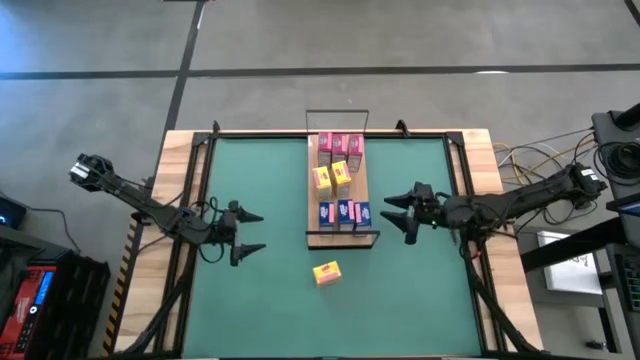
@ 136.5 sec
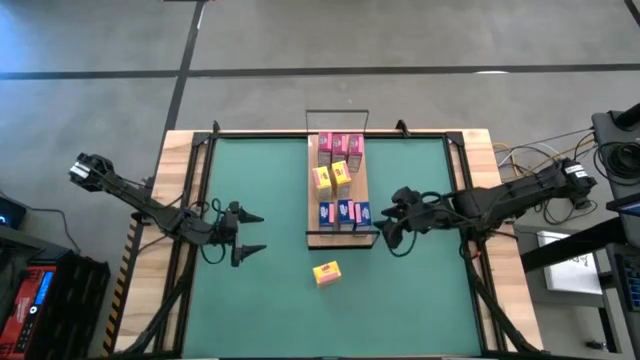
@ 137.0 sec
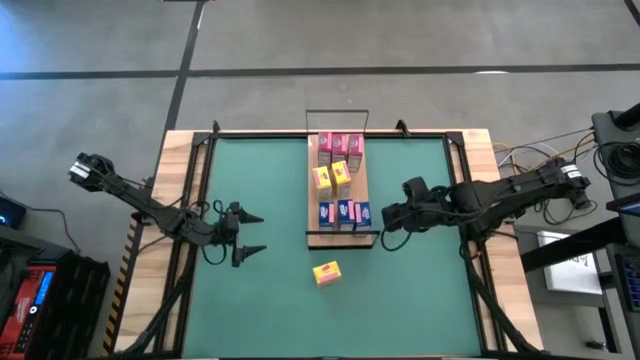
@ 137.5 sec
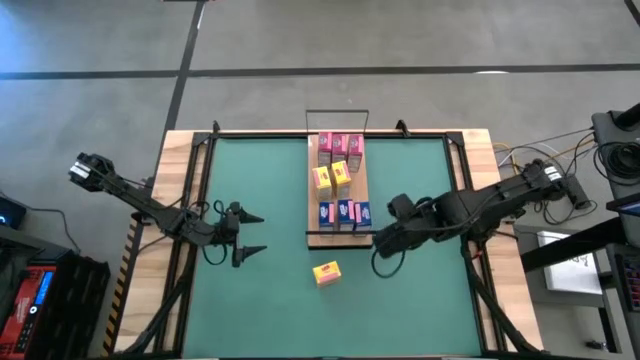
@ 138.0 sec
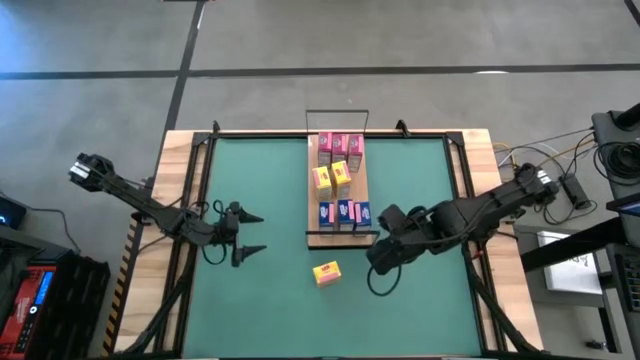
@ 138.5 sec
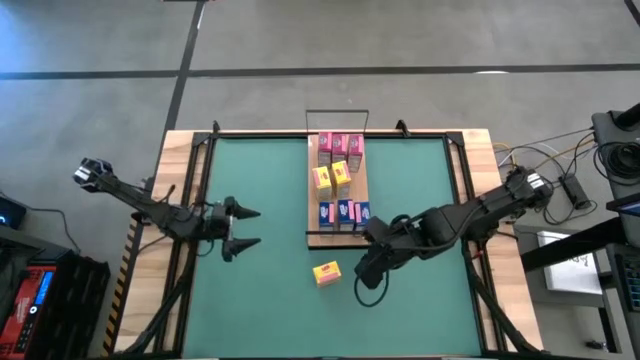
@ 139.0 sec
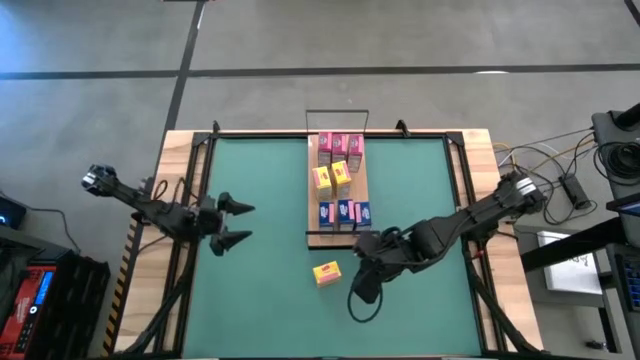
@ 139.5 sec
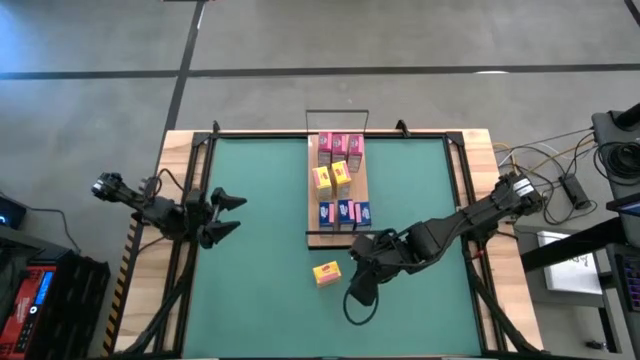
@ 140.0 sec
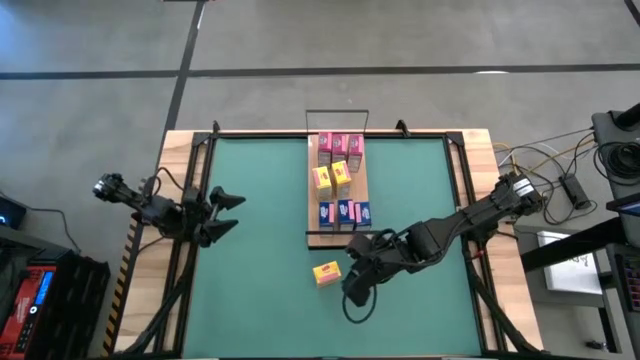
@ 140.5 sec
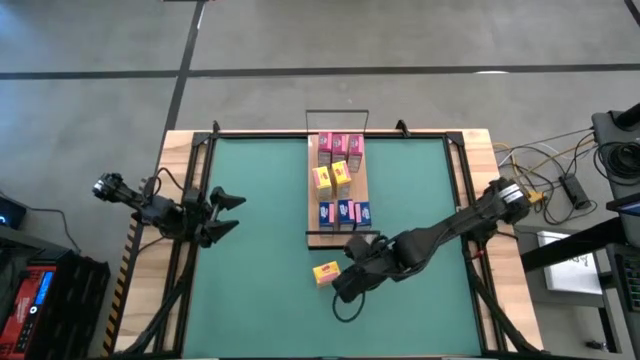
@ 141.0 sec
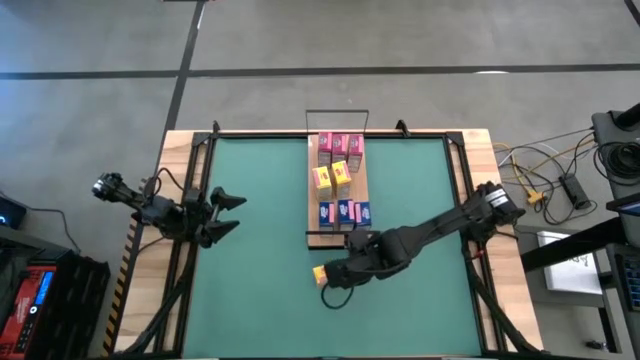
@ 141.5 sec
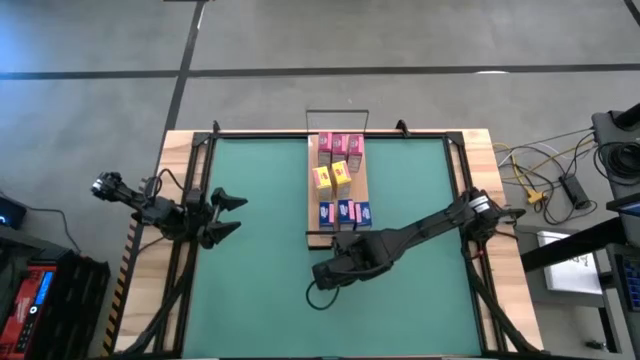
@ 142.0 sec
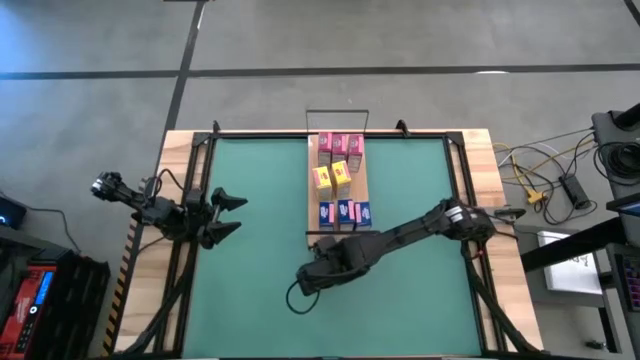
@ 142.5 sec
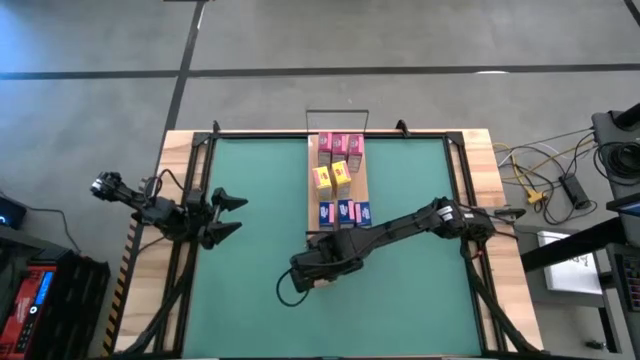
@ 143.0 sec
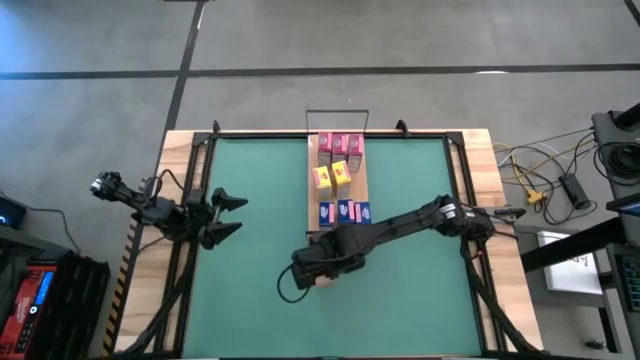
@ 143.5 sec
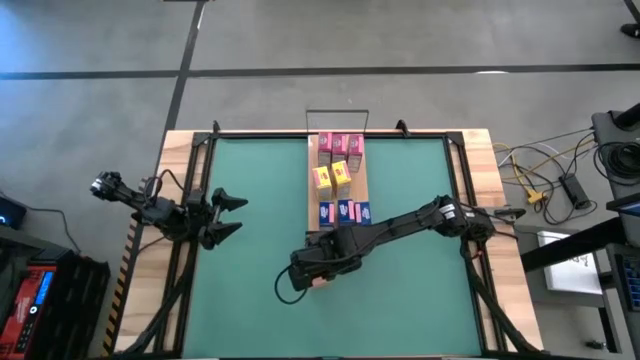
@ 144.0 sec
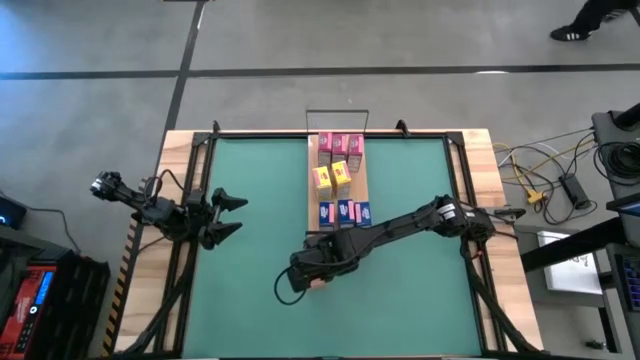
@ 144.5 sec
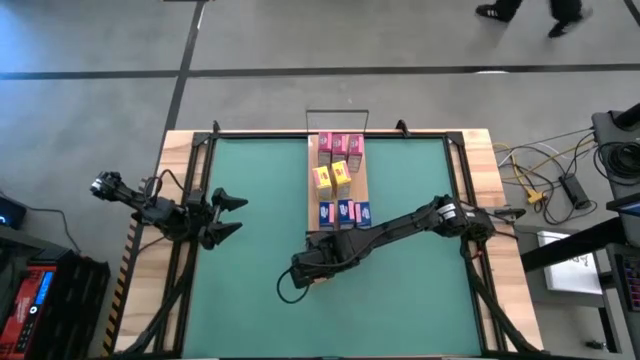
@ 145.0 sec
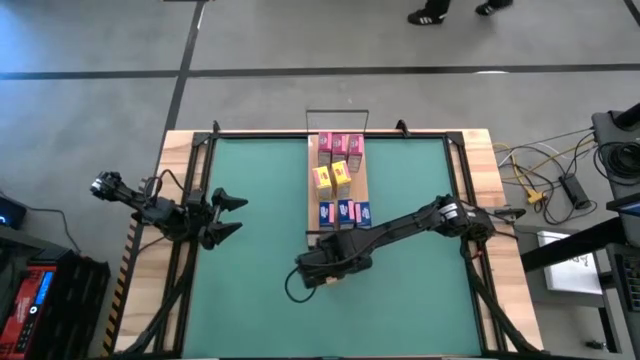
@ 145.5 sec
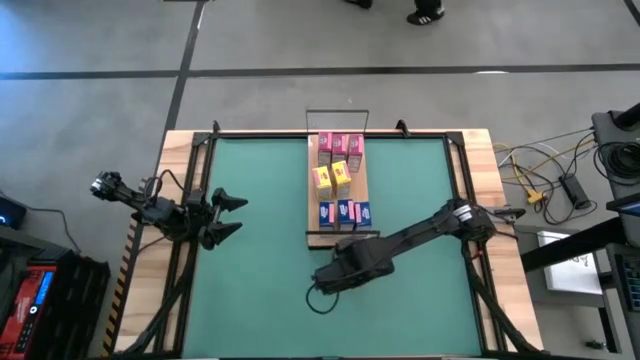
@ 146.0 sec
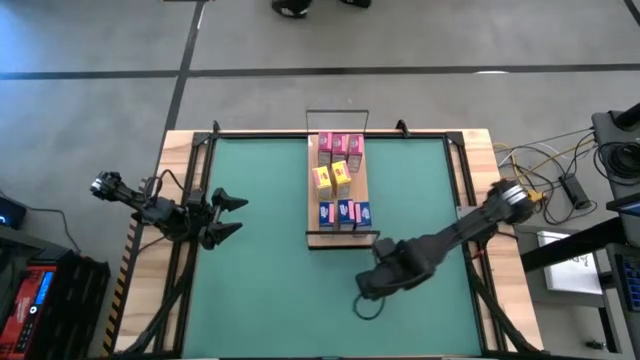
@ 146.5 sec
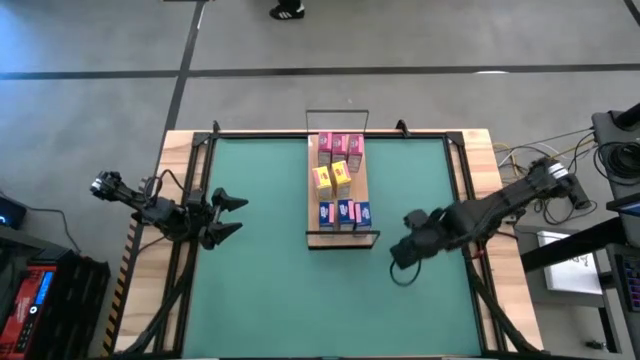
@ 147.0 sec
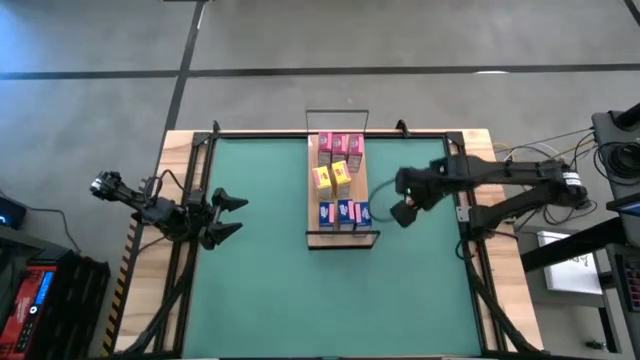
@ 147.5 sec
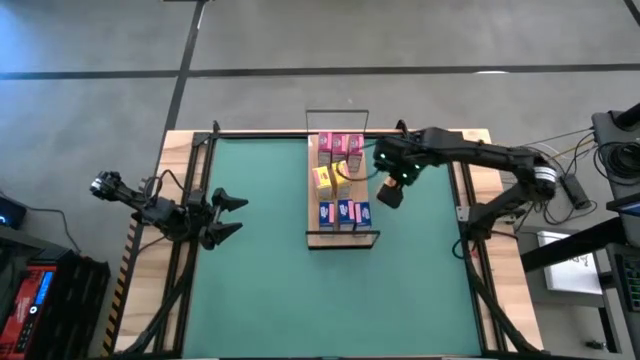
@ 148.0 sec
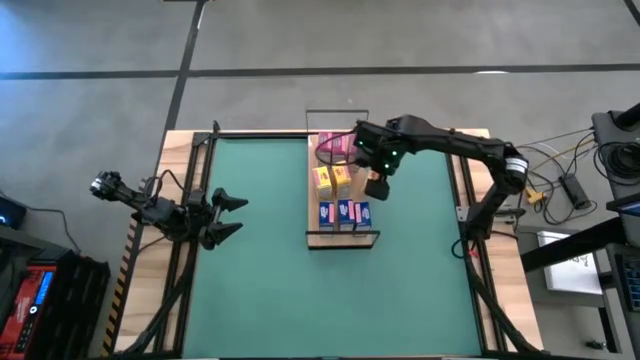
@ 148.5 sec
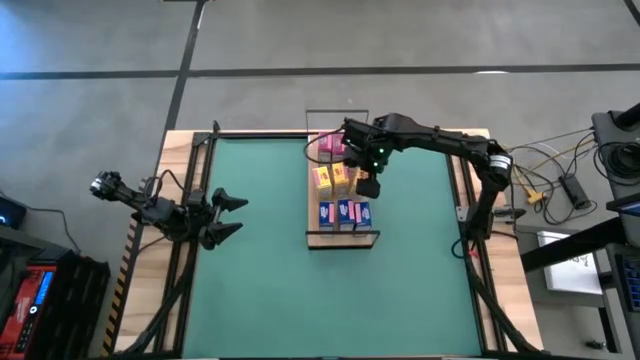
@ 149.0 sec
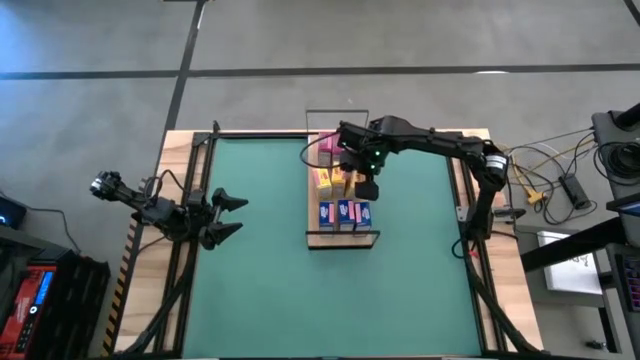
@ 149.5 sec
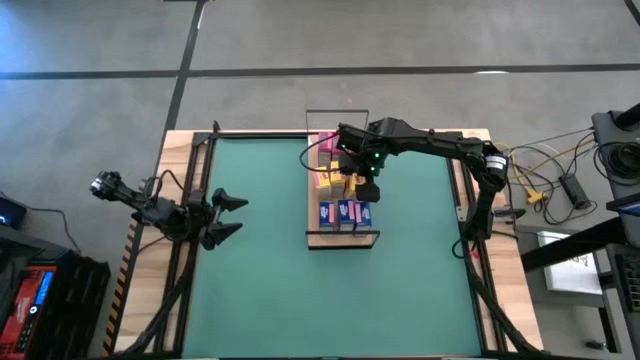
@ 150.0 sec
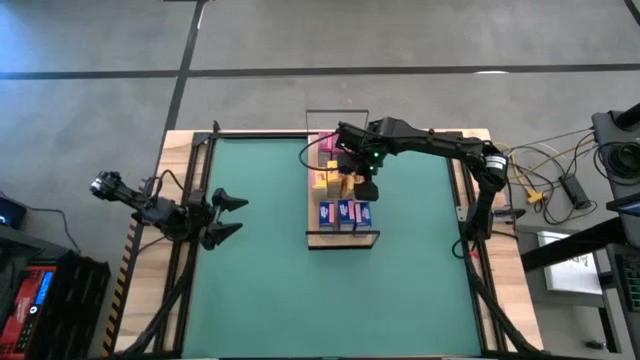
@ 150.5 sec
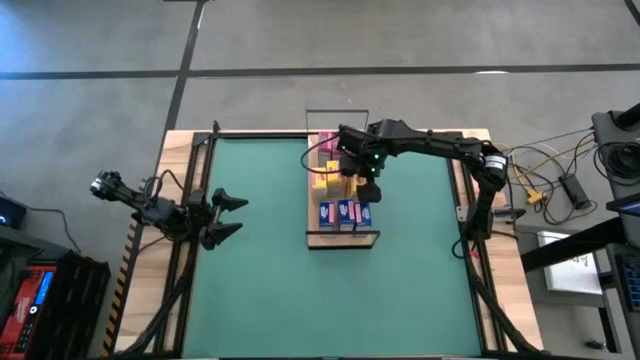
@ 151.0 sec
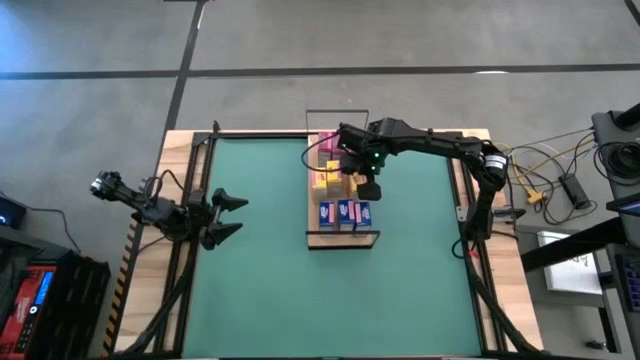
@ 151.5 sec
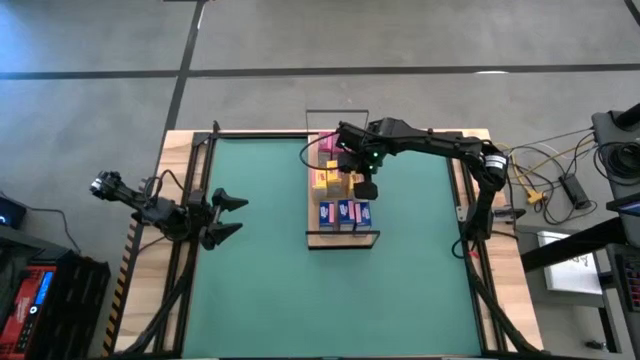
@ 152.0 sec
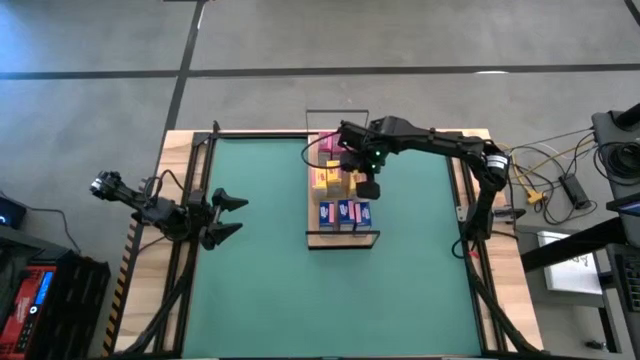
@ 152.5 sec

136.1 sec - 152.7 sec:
Task: Stack cereal on shelf
Put the yellow cereal box on the shelf

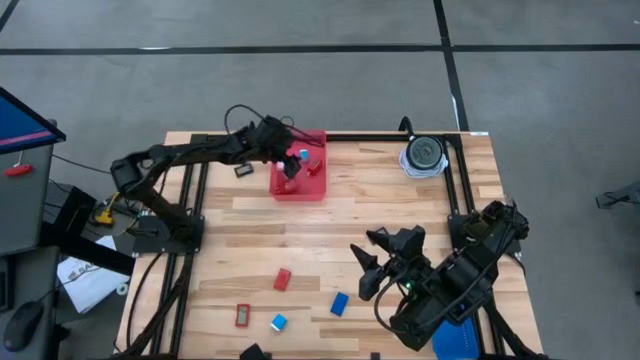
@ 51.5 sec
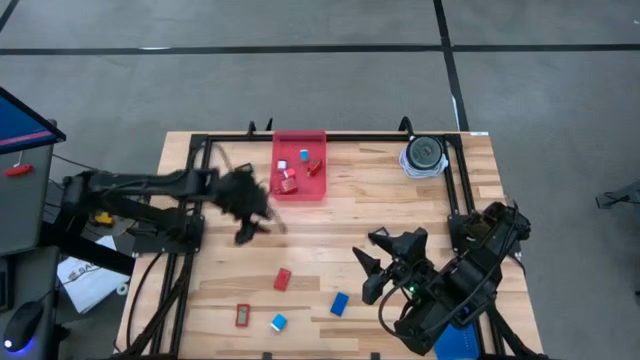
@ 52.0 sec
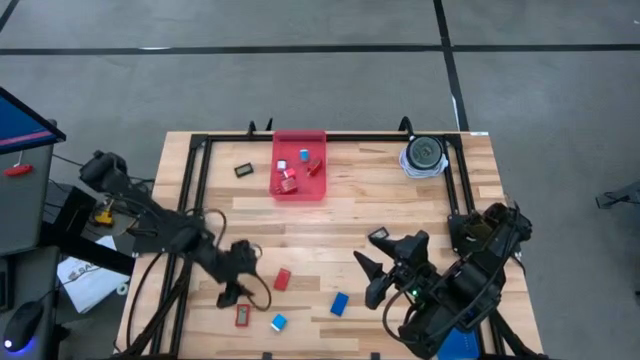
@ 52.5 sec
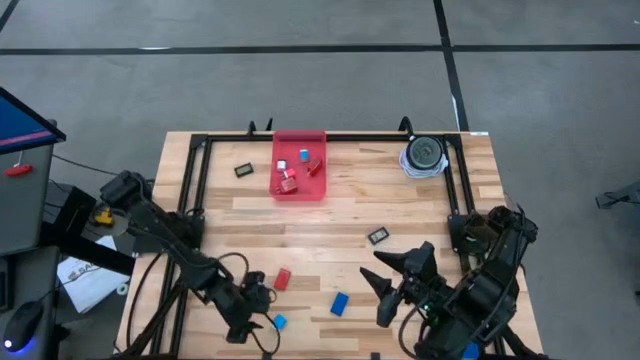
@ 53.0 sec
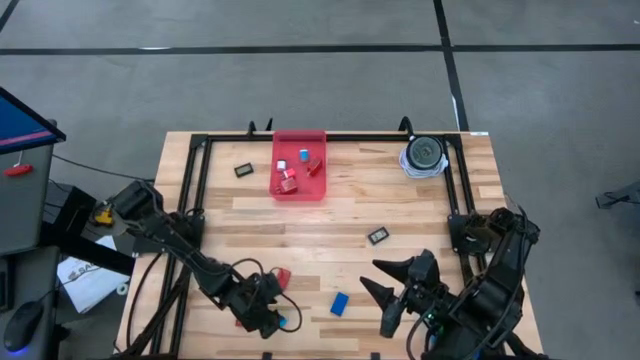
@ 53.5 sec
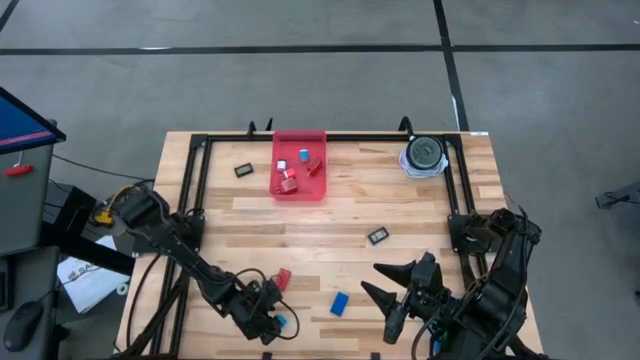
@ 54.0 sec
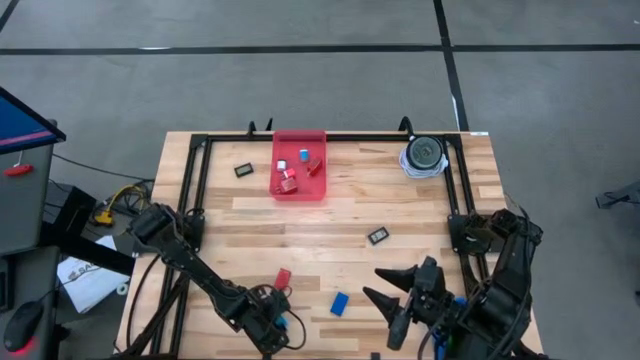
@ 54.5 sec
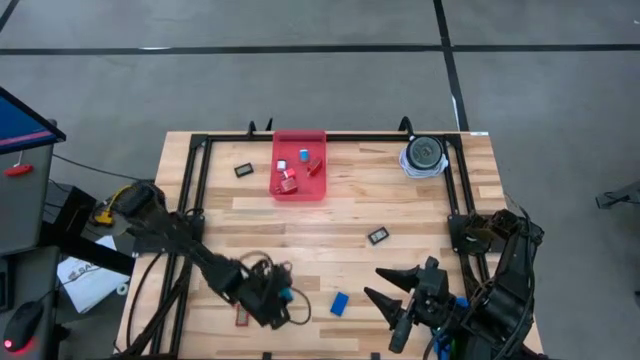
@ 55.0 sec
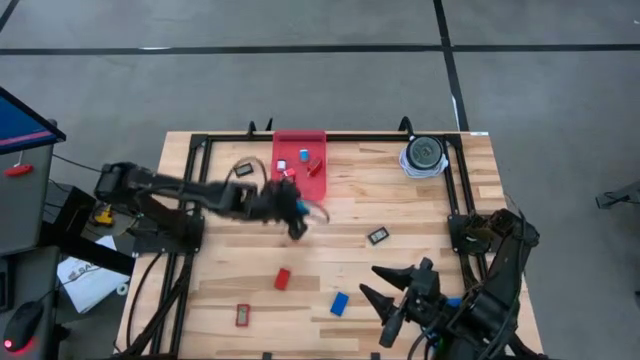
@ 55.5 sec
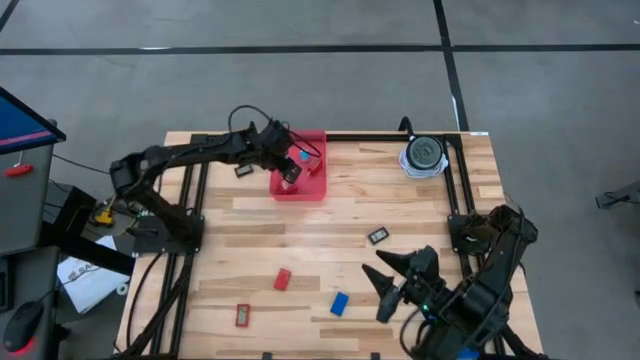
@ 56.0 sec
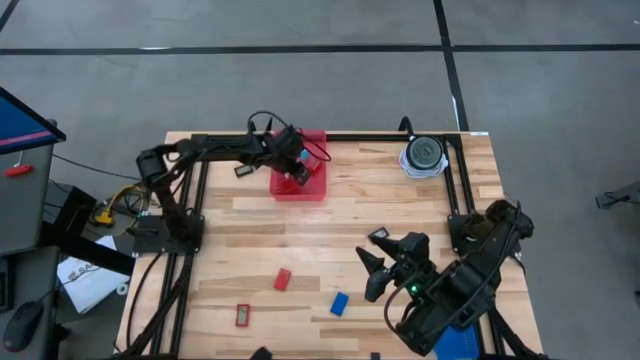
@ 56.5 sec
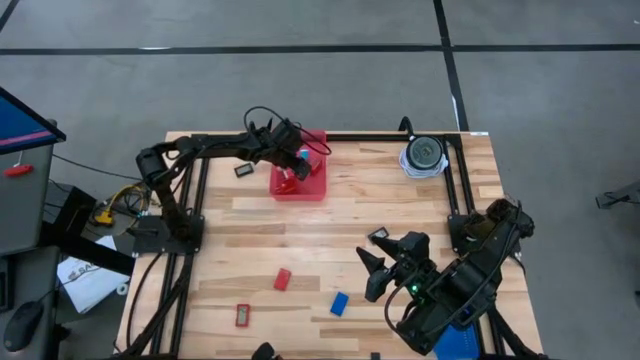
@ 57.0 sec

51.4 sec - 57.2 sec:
Task: Pick & Place Office items
Put the blue and white charger adapter into the red bin
